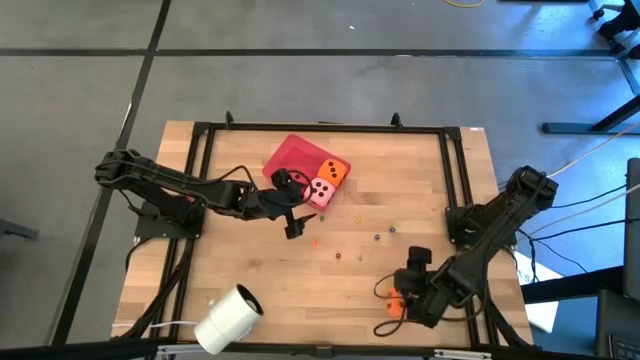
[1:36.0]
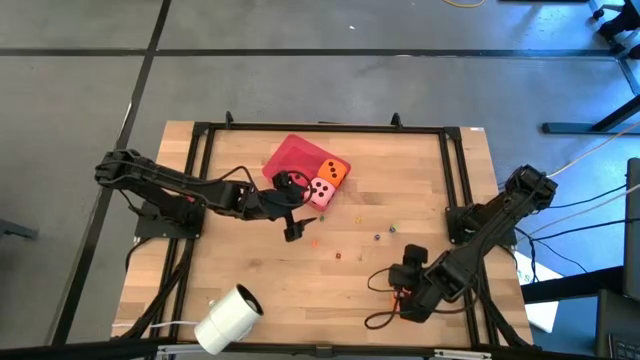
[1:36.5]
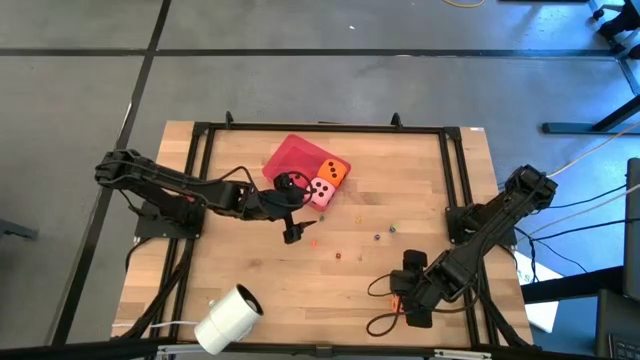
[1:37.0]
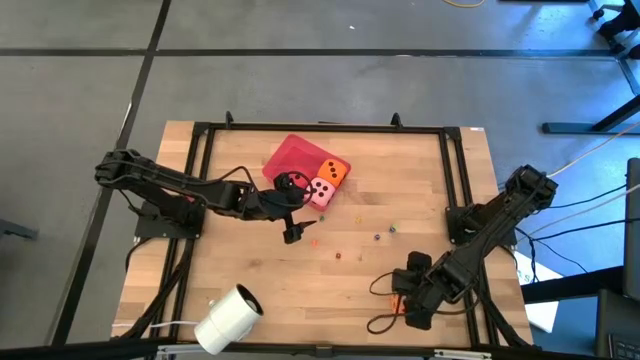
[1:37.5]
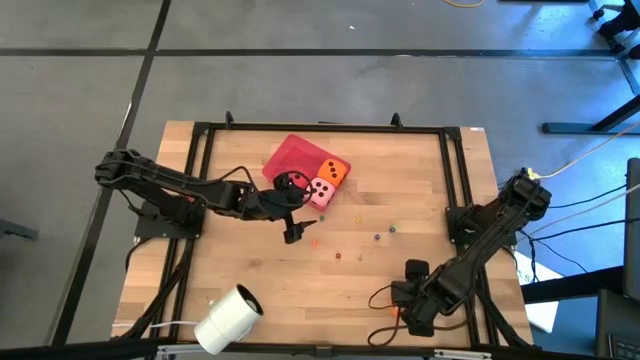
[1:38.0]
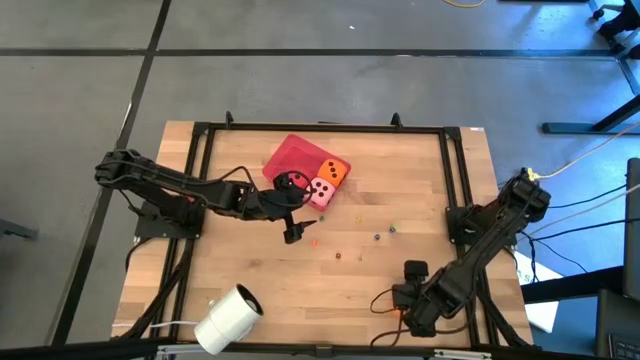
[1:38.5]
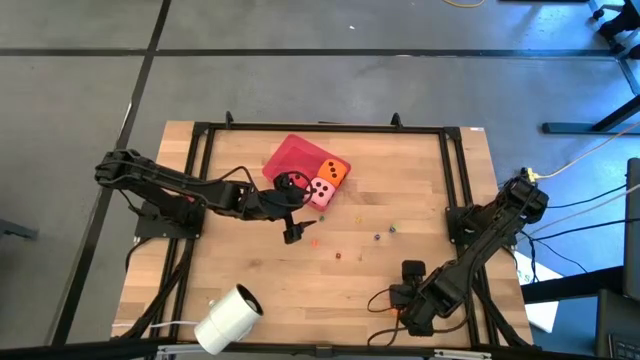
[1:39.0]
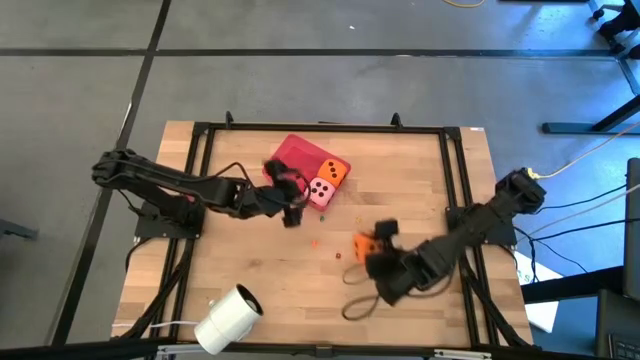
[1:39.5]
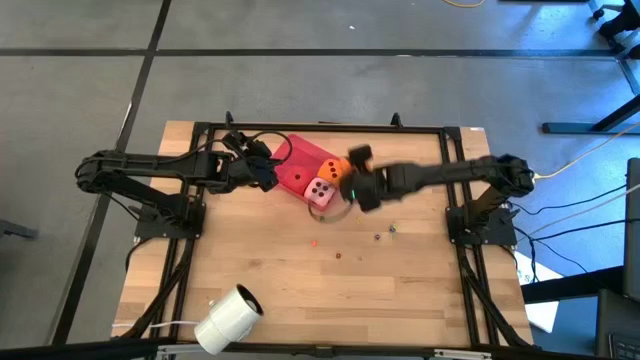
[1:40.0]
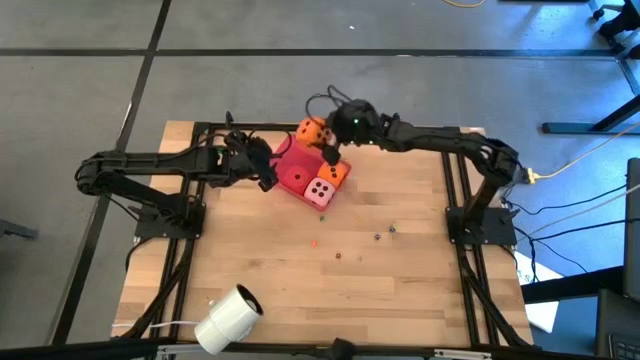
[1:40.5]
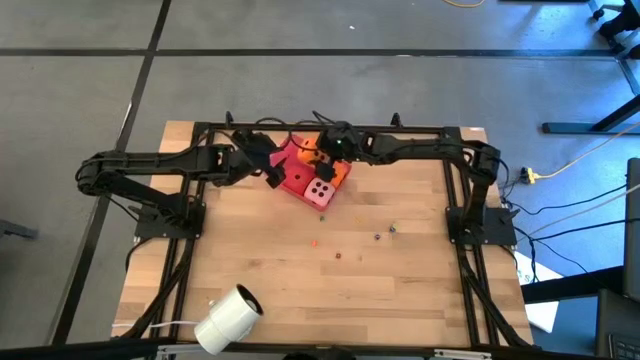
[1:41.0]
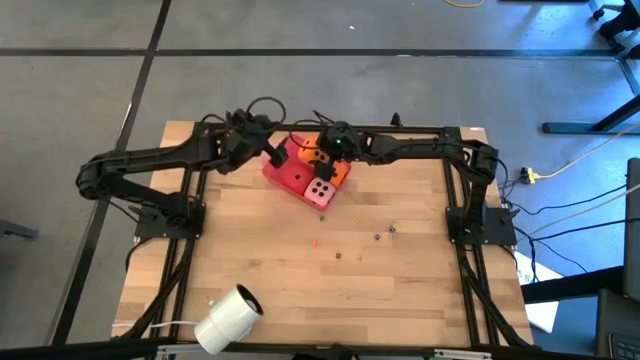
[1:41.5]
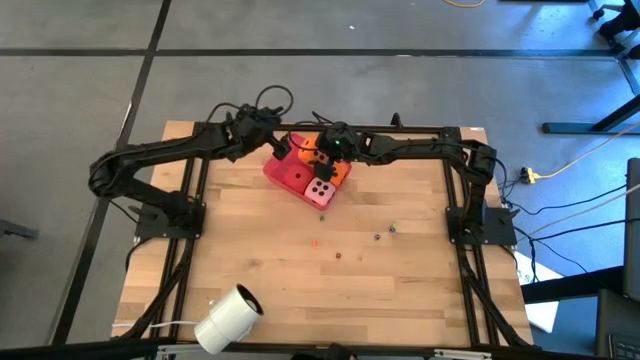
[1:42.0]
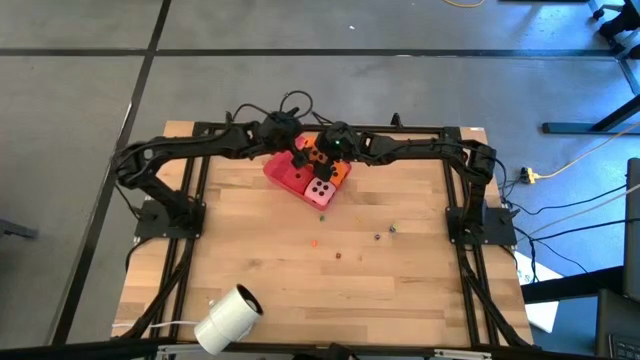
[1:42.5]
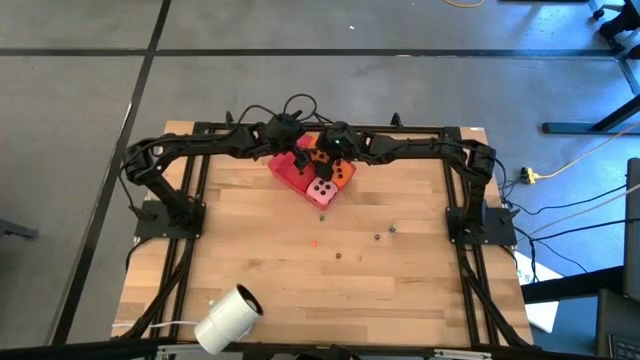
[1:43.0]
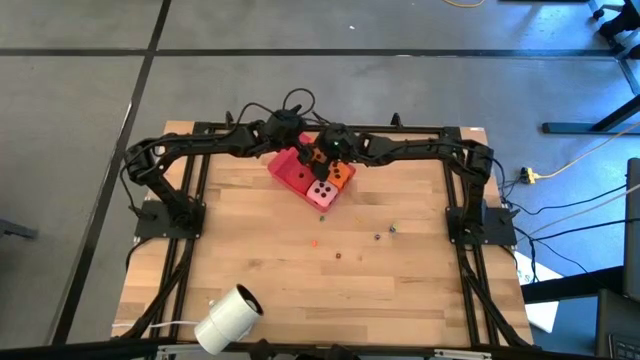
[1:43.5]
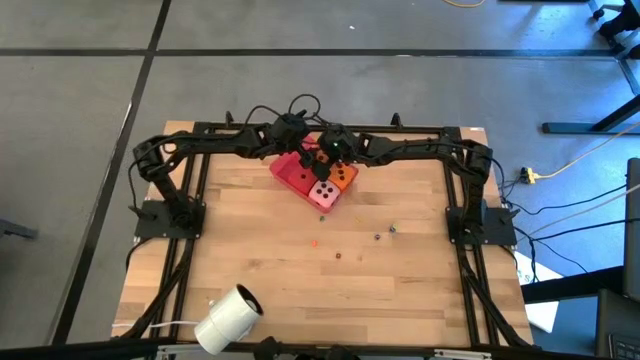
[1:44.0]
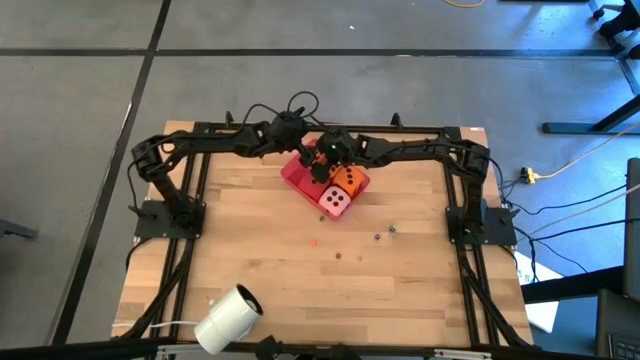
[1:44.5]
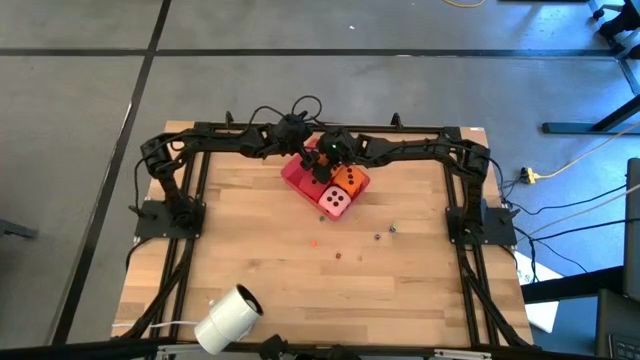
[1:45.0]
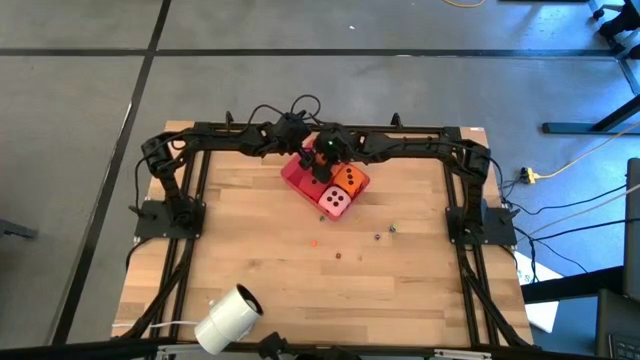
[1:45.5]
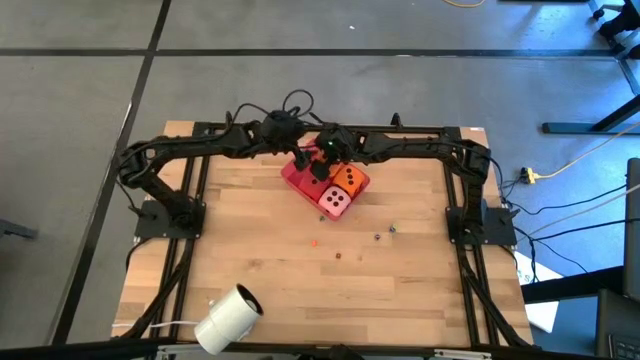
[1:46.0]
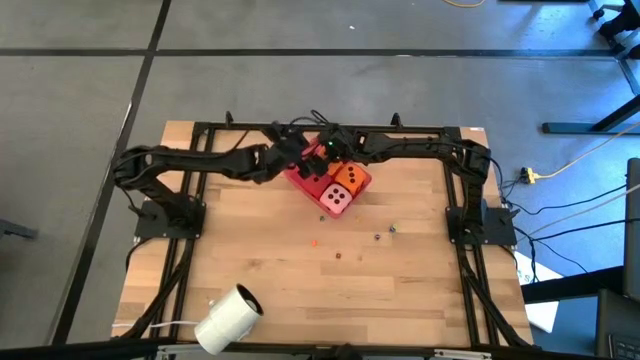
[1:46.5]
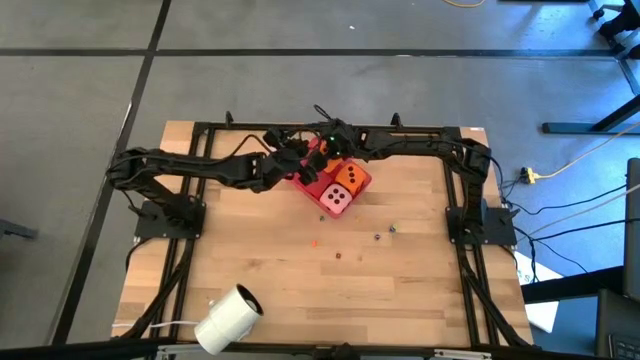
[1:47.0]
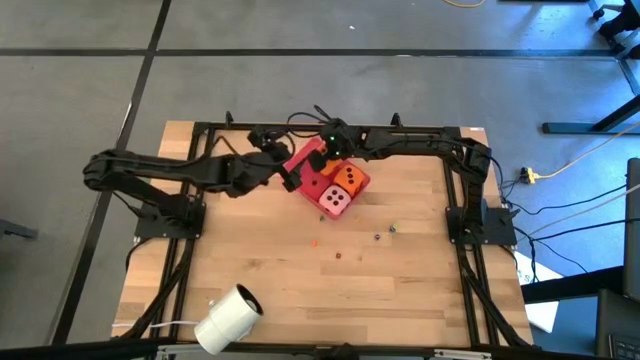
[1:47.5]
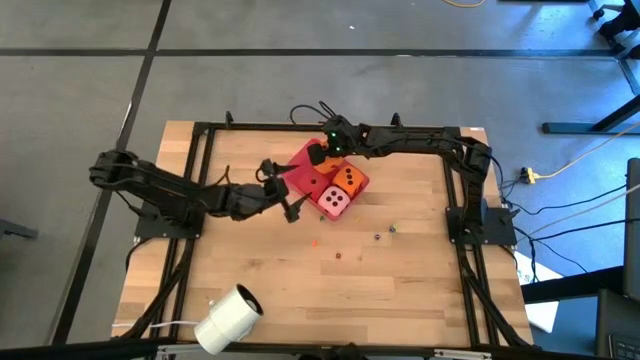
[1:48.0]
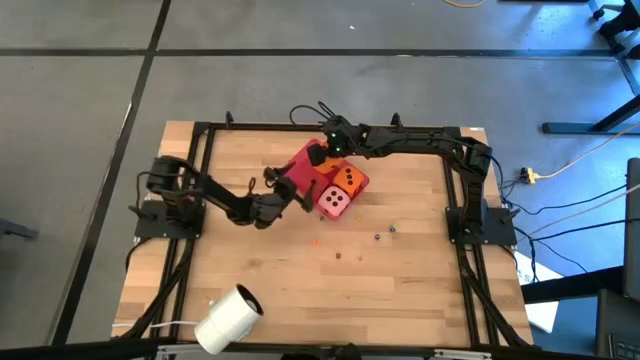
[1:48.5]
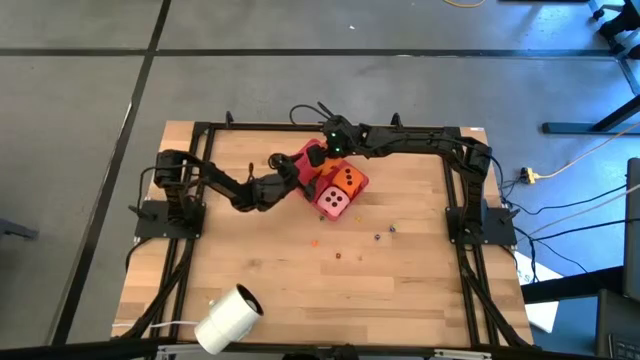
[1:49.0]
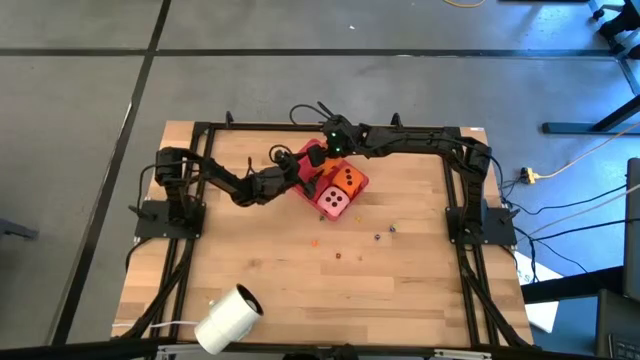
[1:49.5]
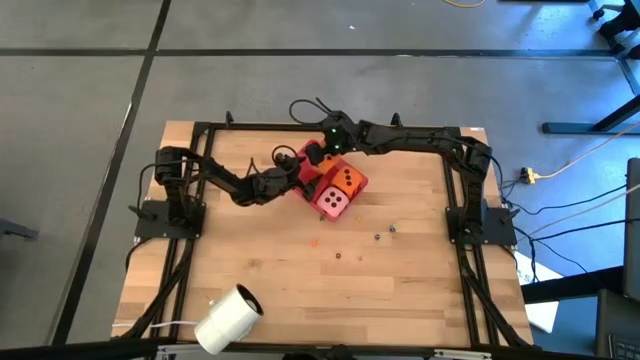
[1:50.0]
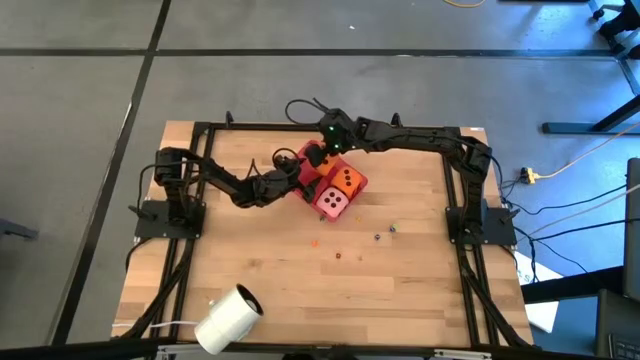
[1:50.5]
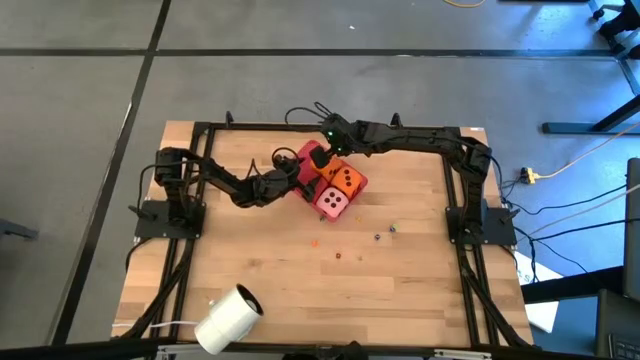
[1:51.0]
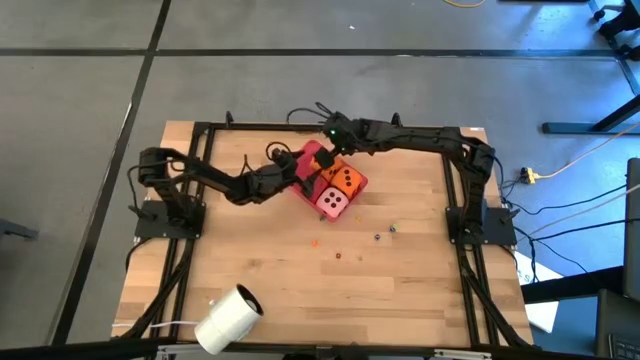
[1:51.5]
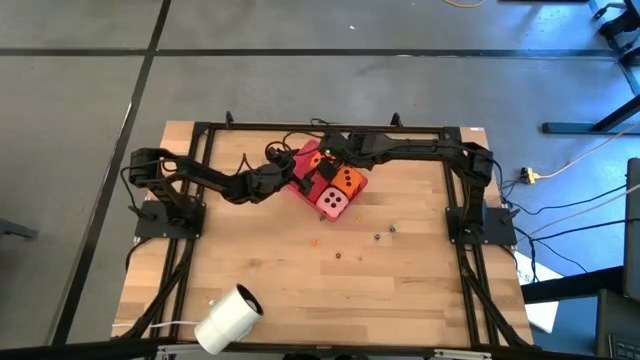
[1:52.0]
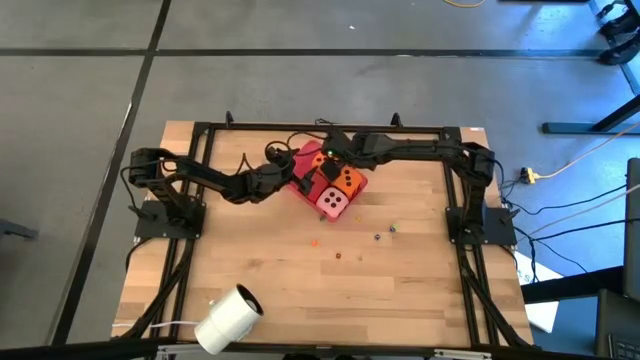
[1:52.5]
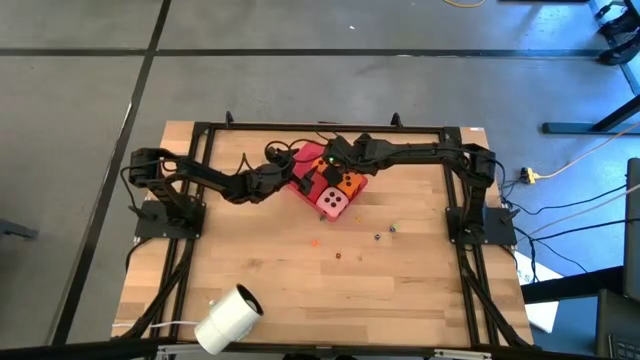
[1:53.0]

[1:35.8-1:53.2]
Task: Pick & Place Dice
Put the large orange die into the red bin

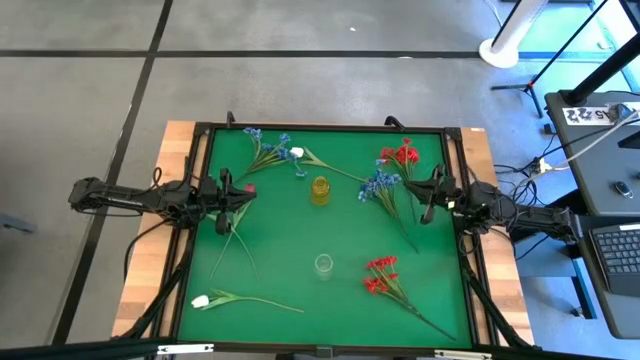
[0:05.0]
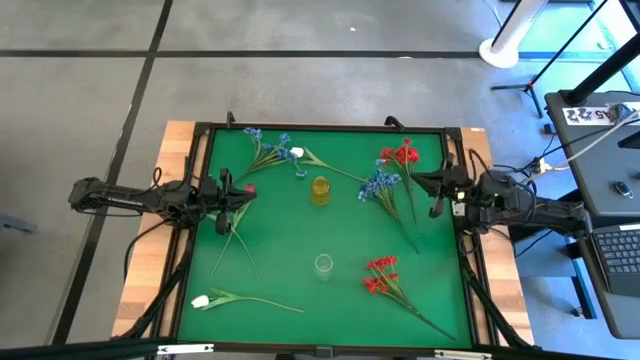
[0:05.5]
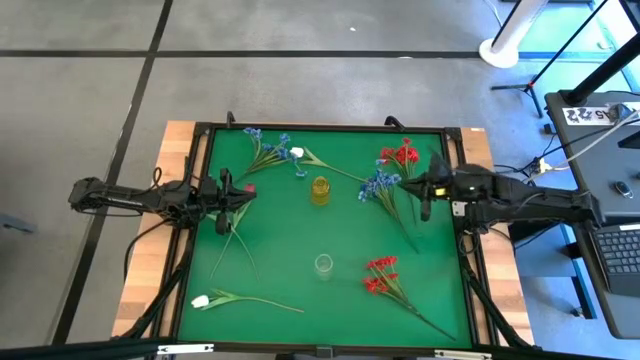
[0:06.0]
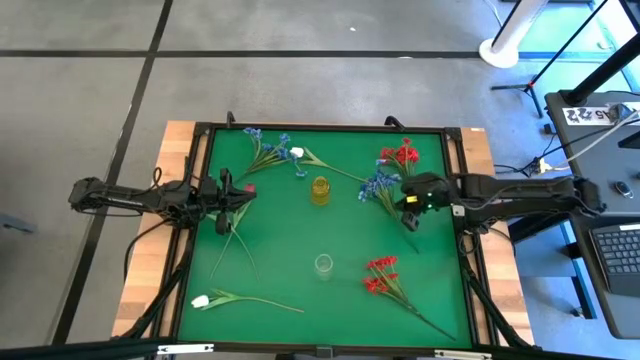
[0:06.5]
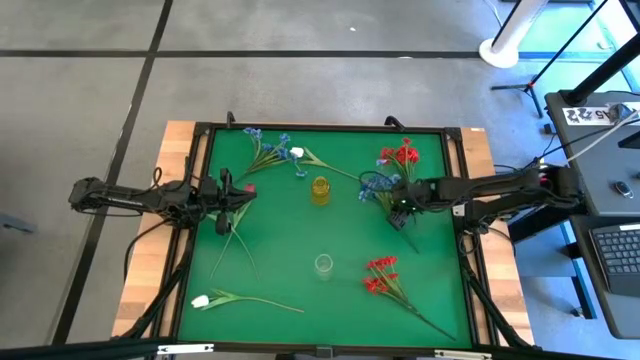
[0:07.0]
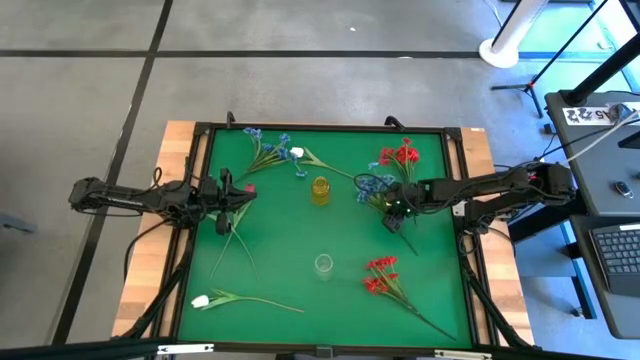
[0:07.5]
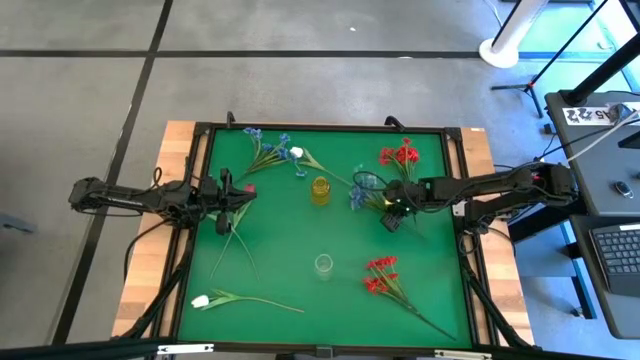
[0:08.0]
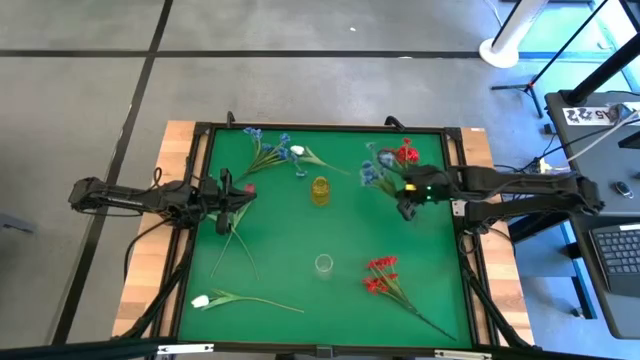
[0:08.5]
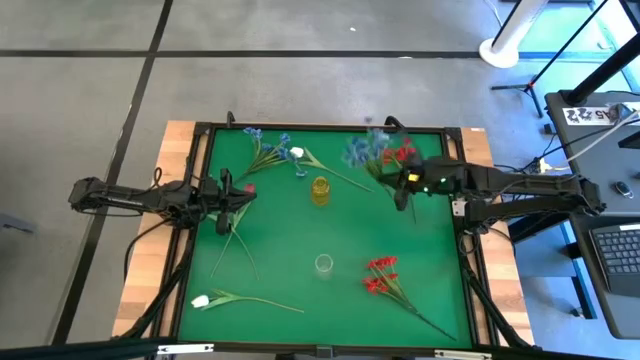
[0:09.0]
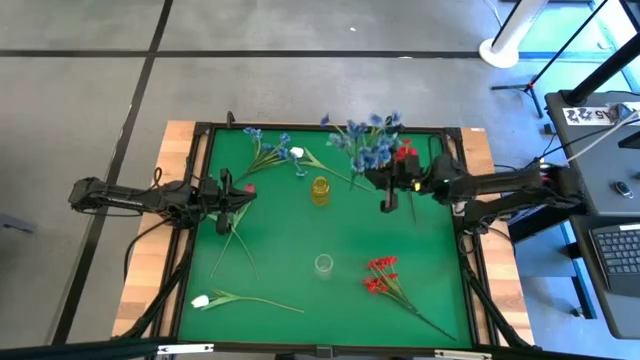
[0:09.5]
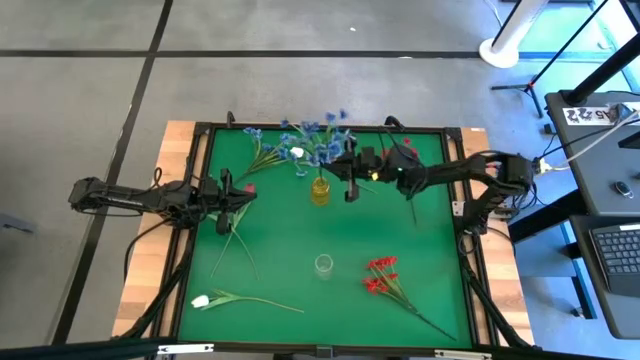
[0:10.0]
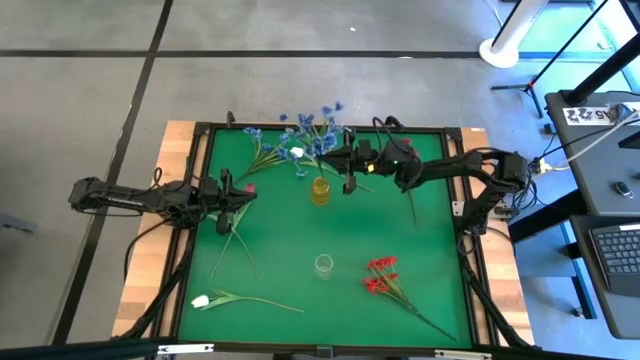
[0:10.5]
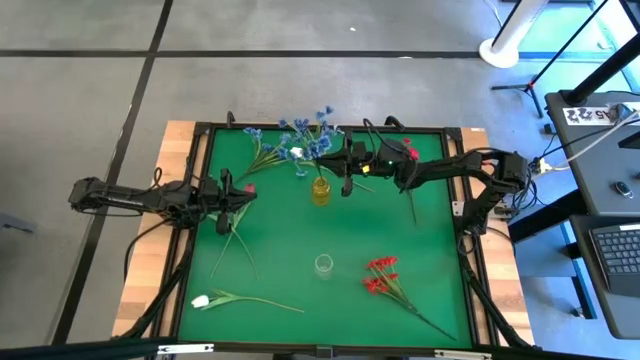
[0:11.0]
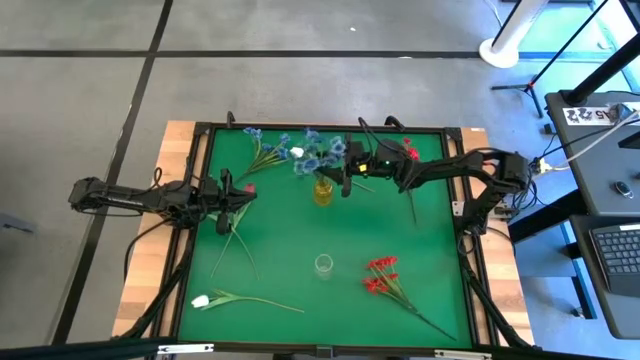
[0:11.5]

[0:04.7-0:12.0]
Task: Sort flowers into vase by color
Put the right blue flowers into the yellow flower vase
